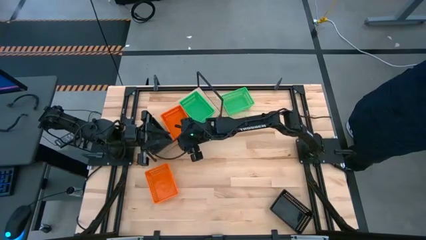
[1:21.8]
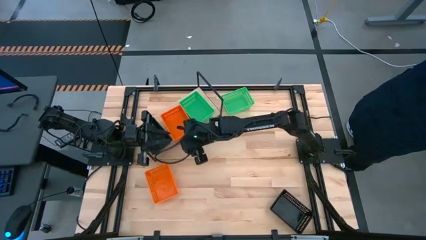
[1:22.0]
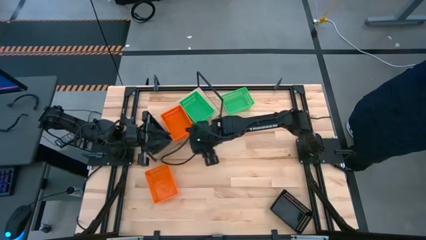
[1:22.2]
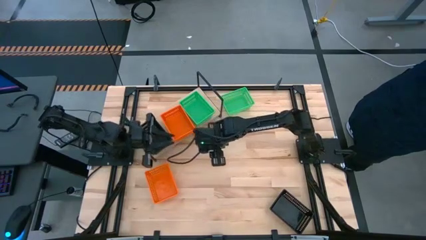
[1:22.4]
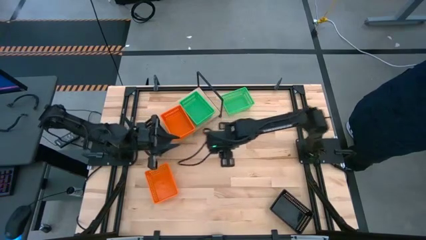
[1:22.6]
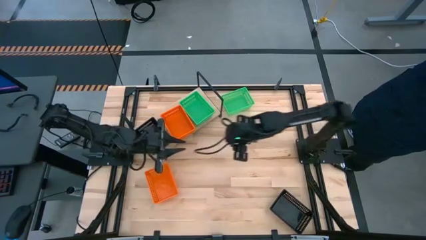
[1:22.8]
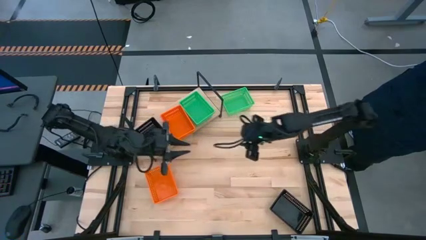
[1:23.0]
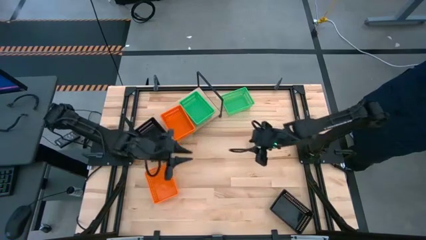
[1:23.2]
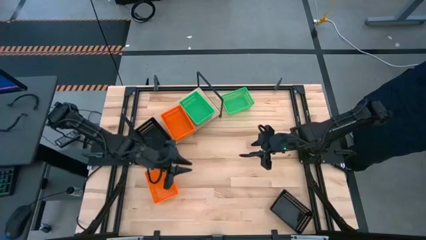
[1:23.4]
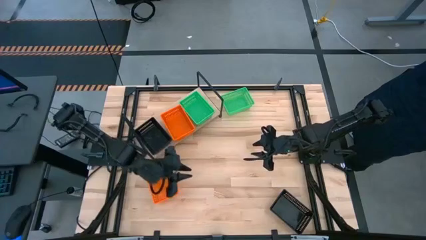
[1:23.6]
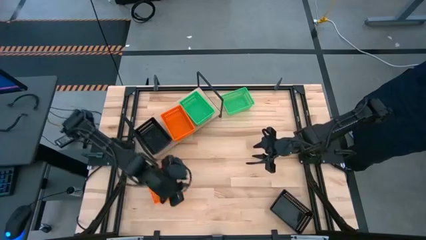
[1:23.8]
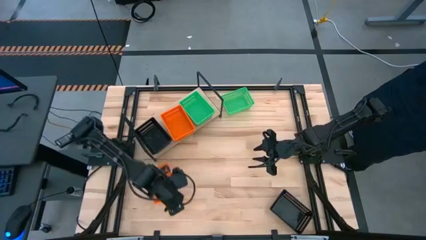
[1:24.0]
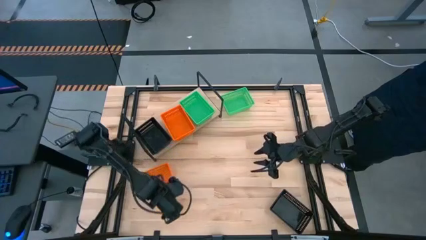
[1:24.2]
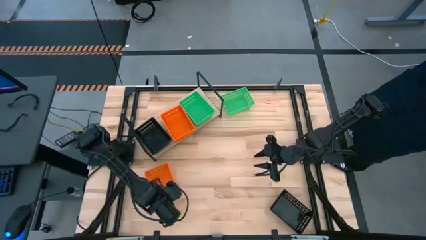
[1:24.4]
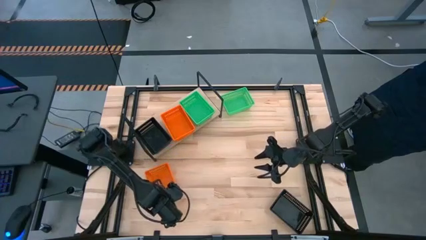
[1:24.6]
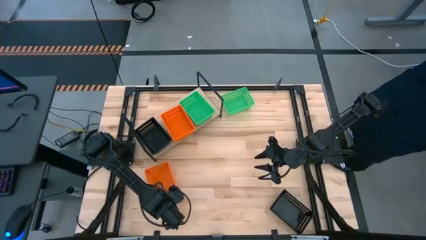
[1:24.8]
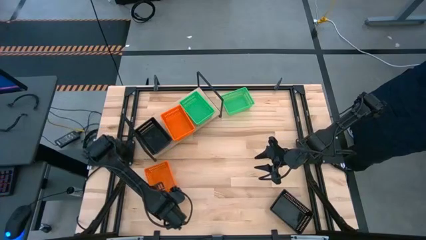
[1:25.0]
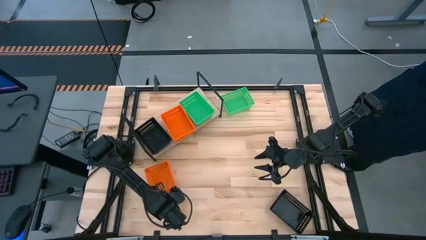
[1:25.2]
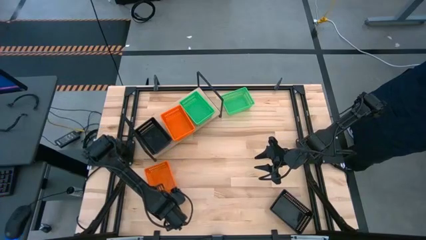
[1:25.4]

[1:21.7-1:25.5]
Task: Stack baskets on shelf by color
Stack the orange bin on top of the orange bin on the shelf

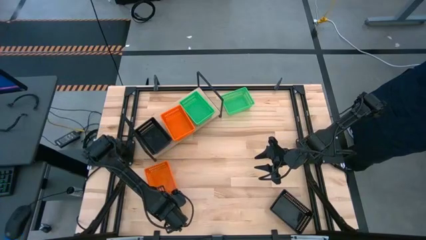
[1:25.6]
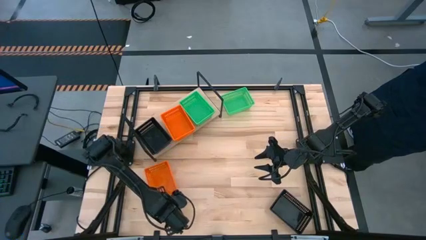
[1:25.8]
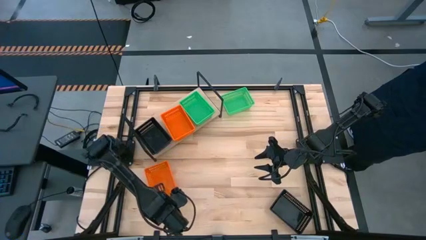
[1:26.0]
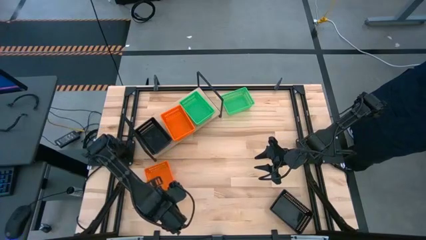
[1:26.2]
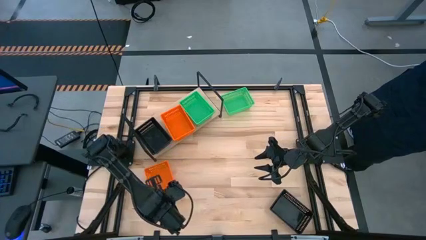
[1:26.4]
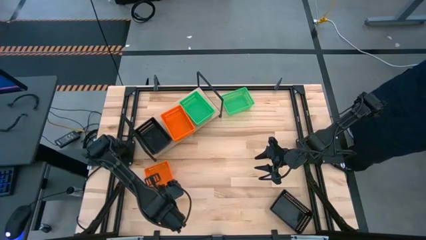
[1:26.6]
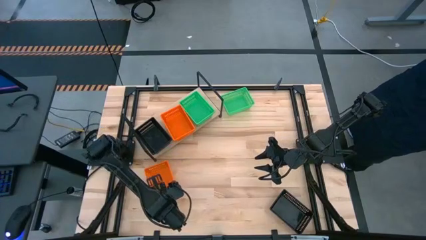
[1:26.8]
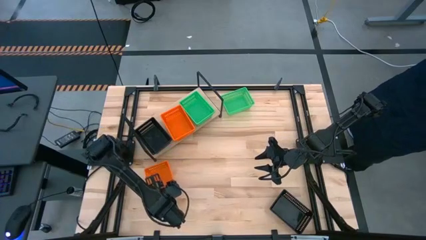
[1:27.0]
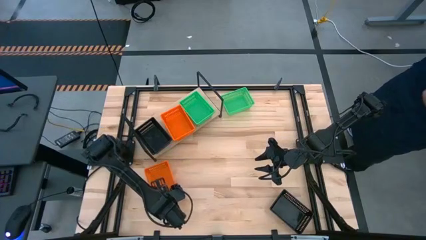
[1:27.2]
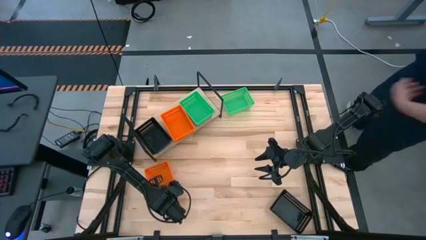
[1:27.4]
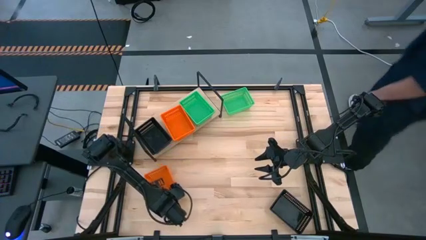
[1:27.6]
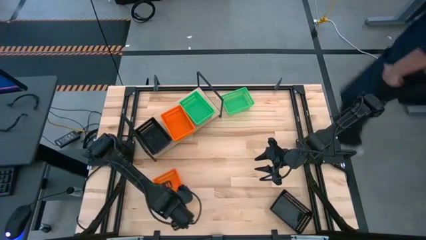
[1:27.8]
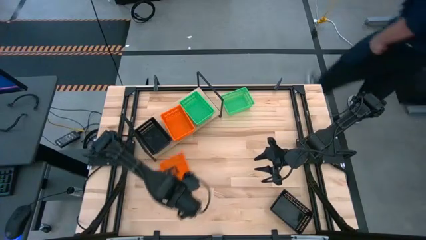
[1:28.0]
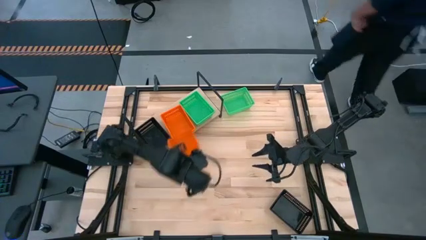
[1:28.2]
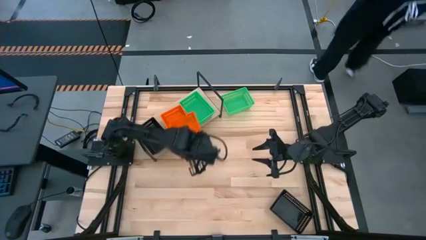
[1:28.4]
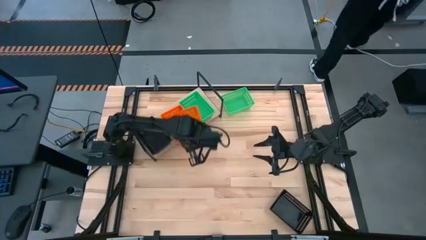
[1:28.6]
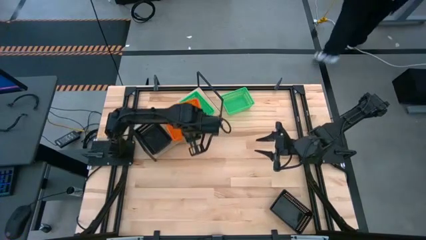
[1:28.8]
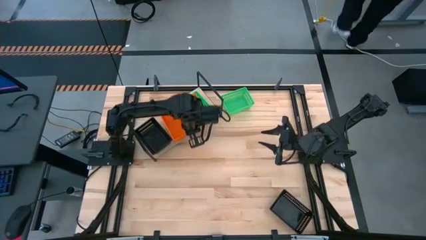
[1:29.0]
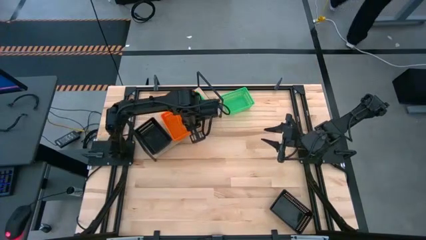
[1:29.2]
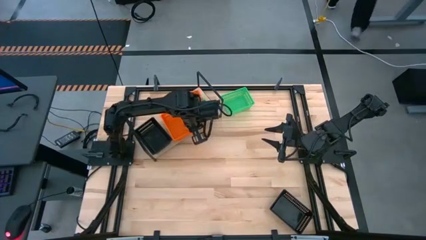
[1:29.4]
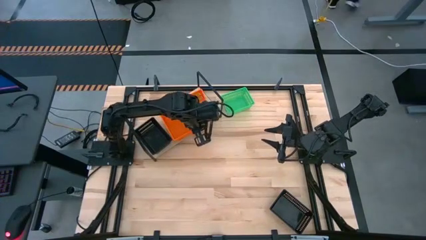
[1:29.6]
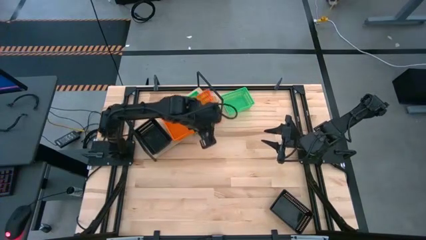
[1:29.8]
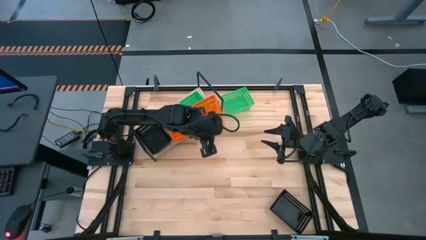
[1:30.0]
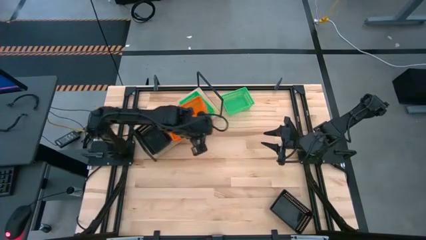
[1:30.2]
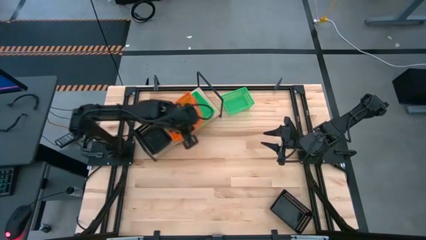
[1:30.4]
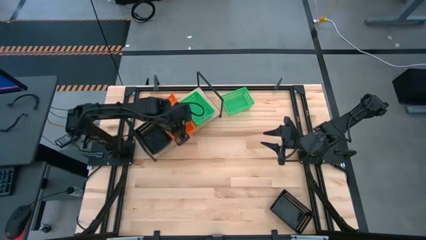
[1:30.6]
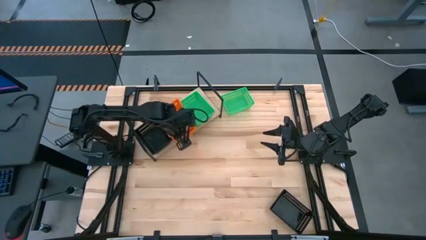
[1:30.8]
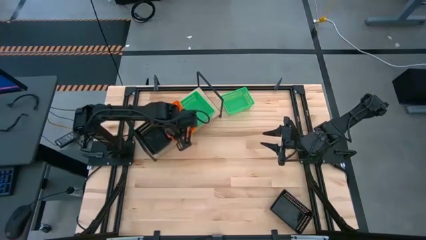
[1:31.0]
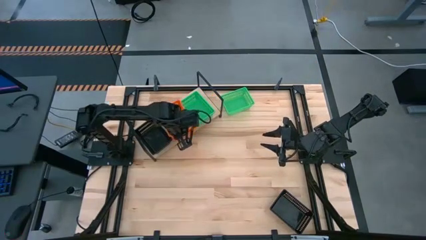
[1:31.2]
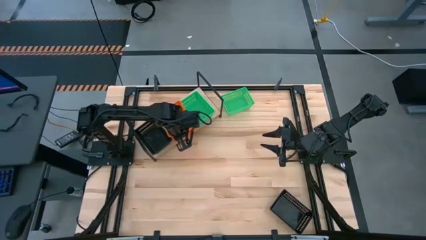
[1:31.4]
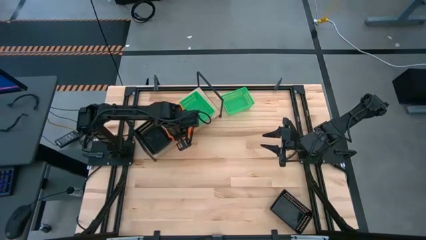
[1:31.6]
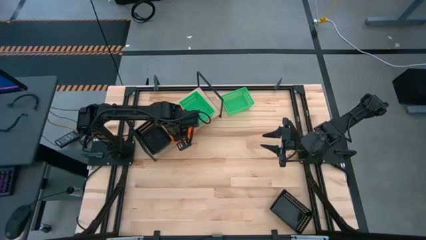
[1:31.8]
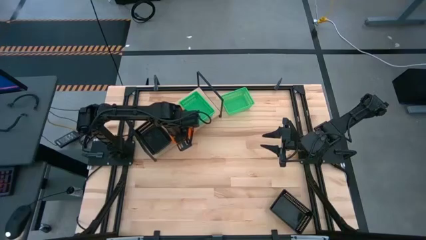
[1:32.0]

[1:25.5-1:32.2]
Stack the orange bin on top of the orange bin on the shelf

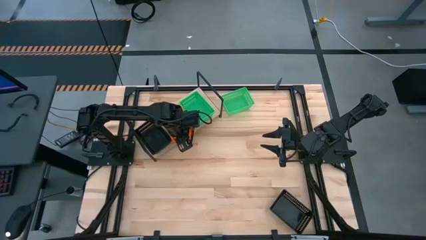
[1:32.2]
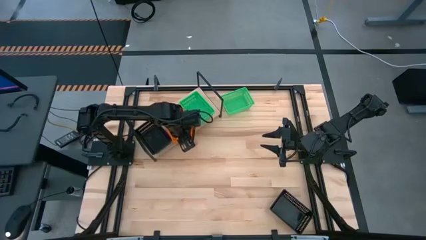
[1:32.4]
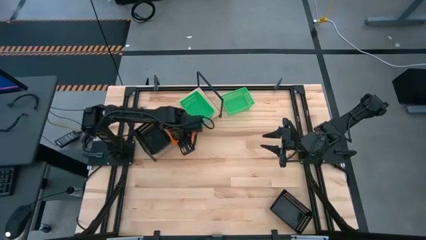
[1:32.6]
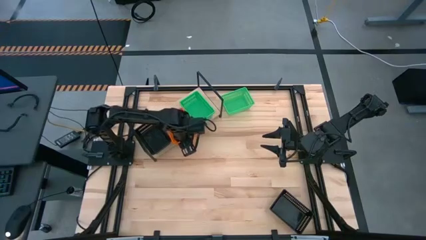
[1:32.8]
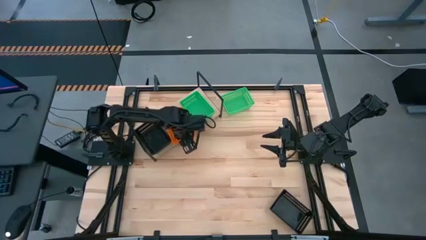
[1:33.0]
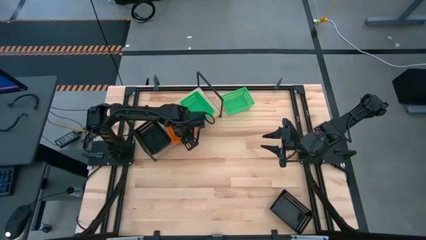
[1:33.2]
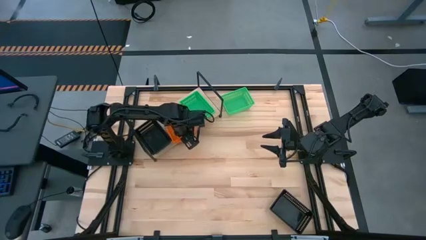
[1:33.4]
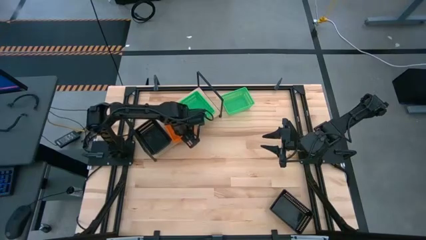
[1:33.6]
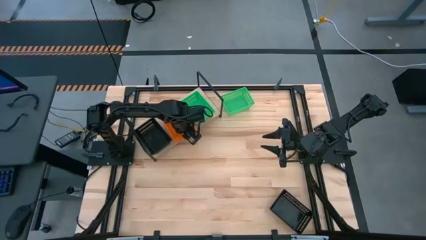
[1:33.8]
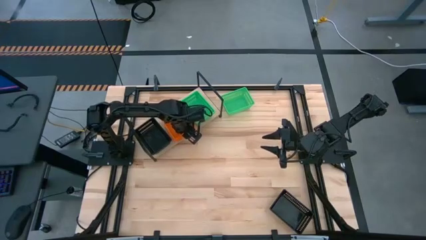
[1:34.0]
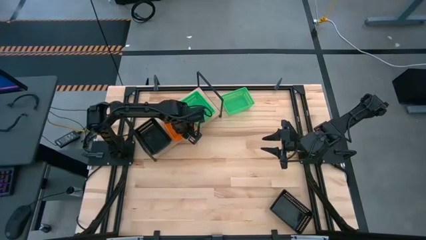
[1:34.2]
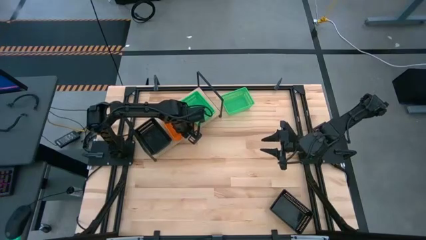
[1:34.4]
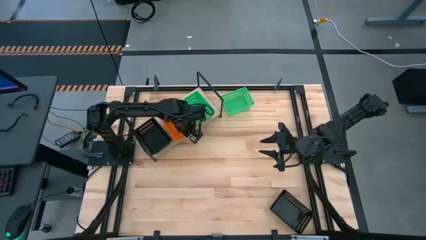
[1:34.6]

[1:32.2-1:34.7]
Adjust the stacked orange bins on the shelf
